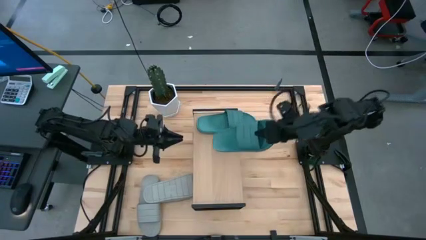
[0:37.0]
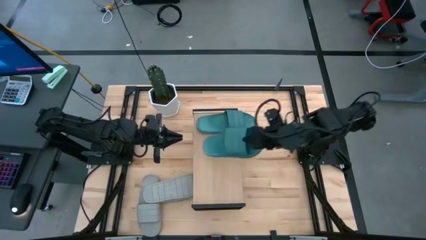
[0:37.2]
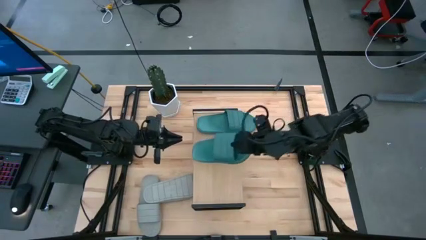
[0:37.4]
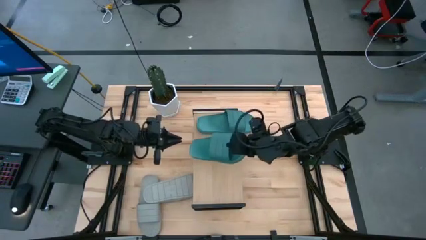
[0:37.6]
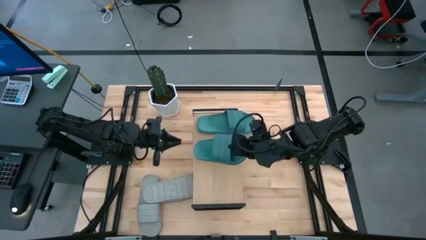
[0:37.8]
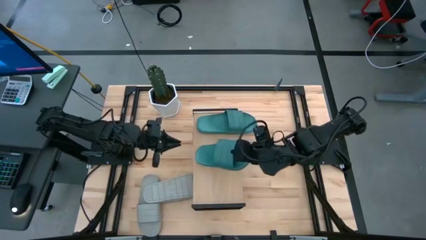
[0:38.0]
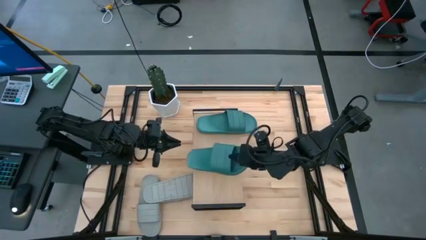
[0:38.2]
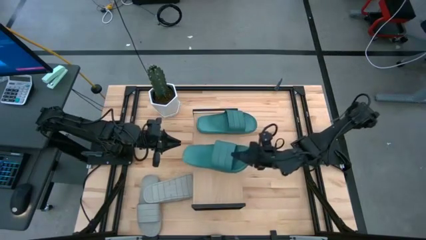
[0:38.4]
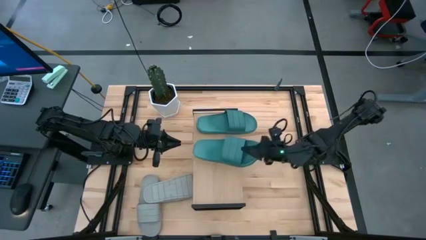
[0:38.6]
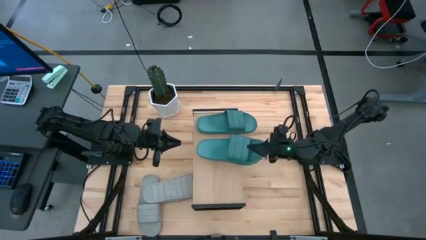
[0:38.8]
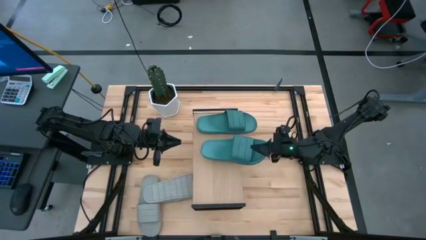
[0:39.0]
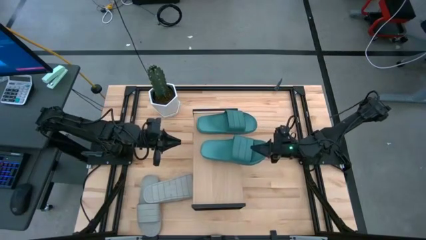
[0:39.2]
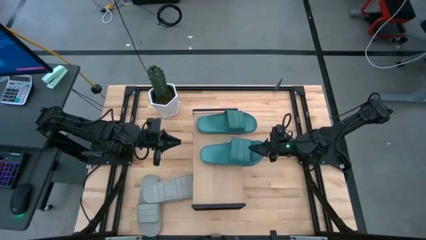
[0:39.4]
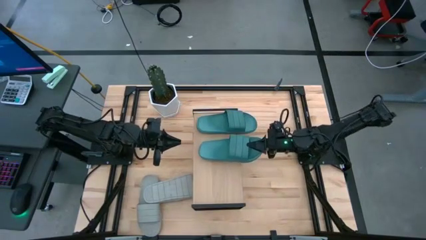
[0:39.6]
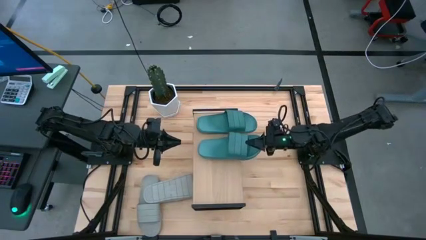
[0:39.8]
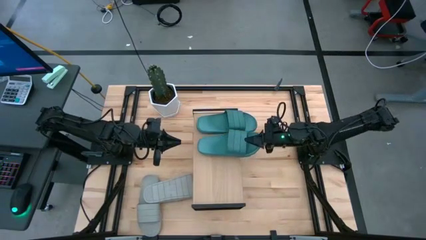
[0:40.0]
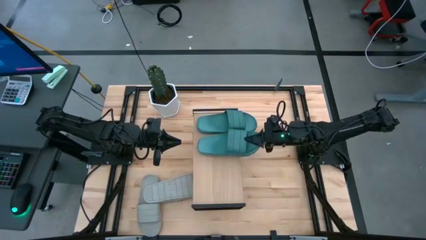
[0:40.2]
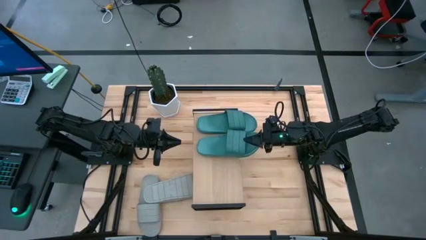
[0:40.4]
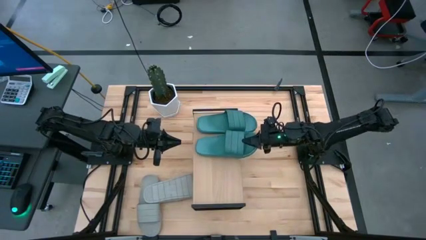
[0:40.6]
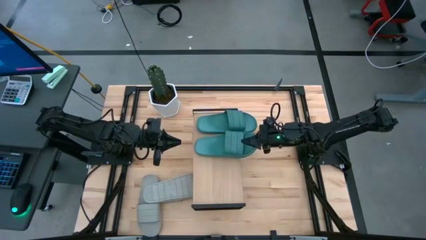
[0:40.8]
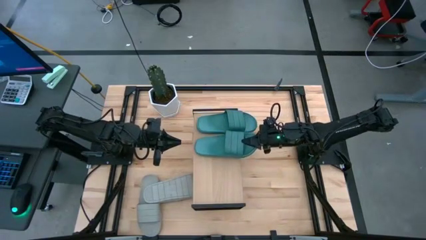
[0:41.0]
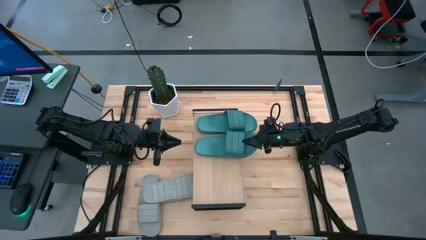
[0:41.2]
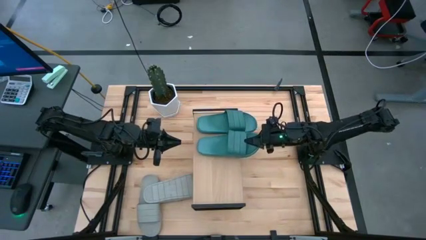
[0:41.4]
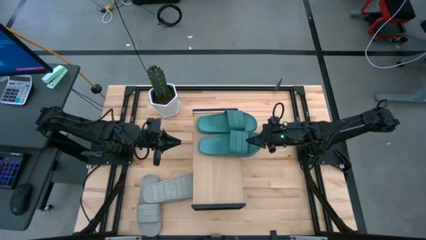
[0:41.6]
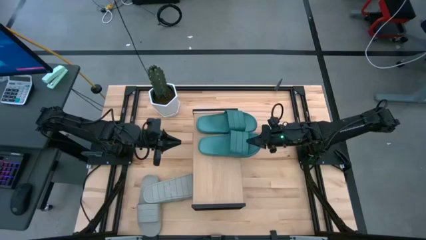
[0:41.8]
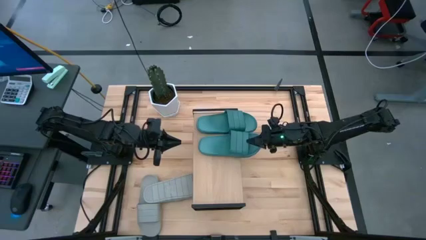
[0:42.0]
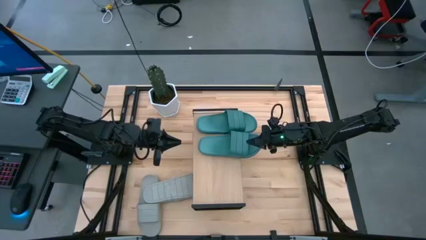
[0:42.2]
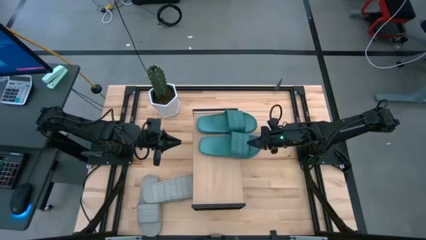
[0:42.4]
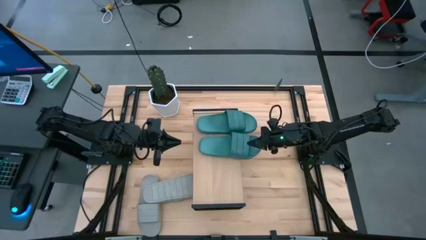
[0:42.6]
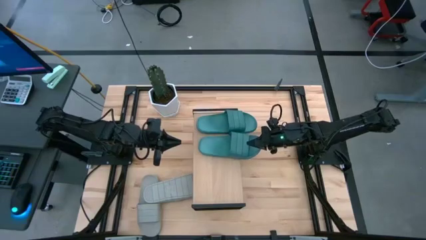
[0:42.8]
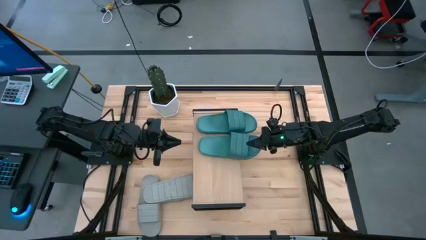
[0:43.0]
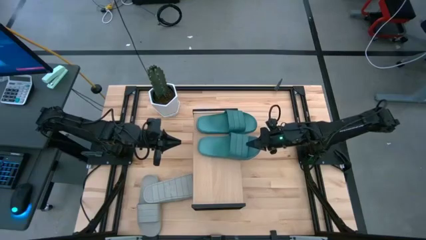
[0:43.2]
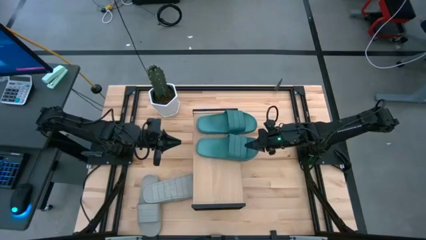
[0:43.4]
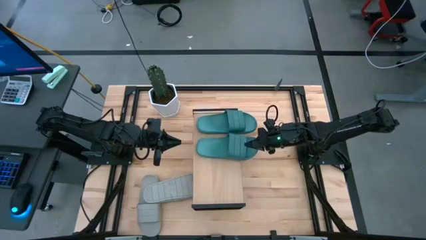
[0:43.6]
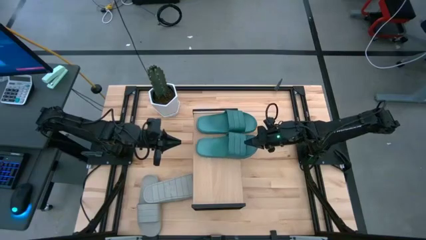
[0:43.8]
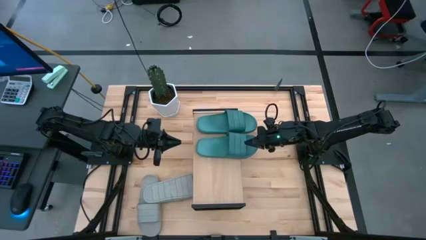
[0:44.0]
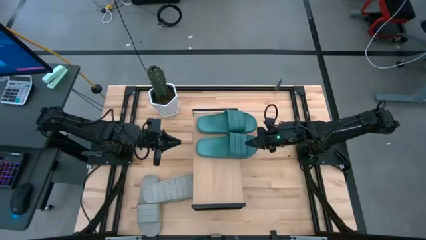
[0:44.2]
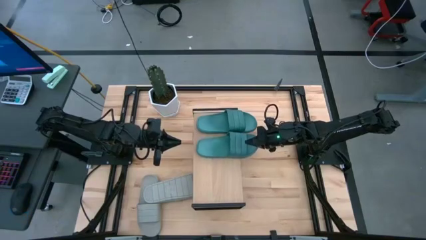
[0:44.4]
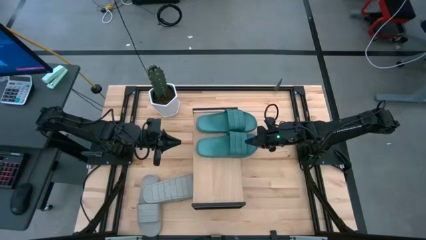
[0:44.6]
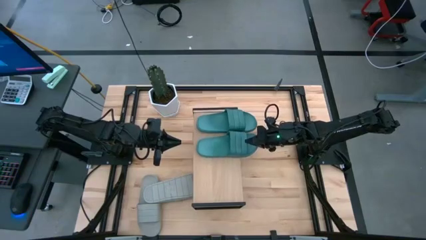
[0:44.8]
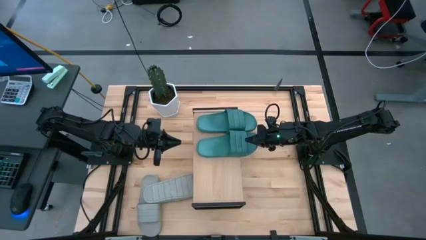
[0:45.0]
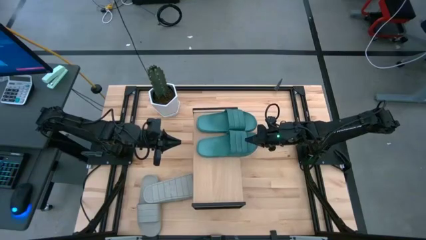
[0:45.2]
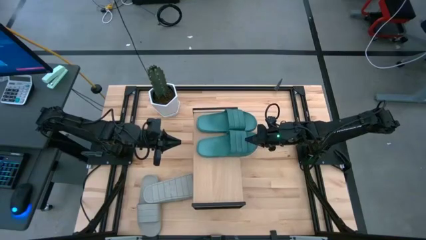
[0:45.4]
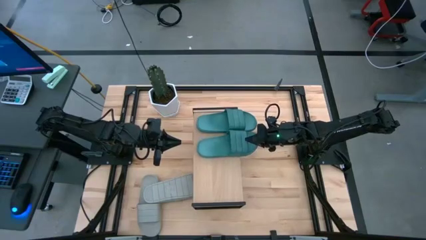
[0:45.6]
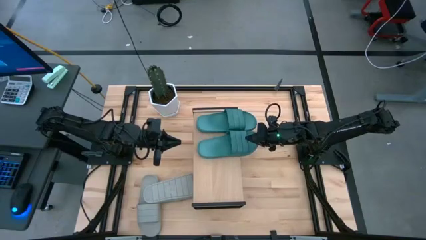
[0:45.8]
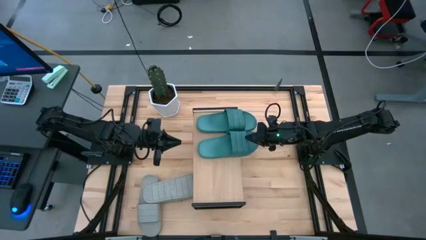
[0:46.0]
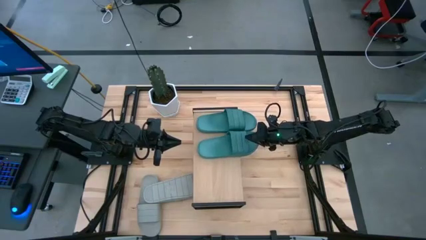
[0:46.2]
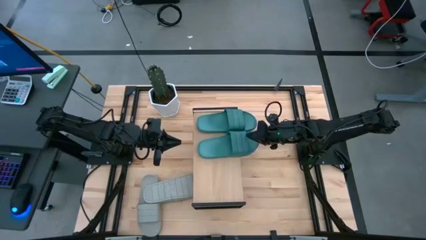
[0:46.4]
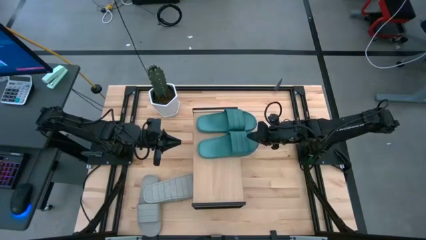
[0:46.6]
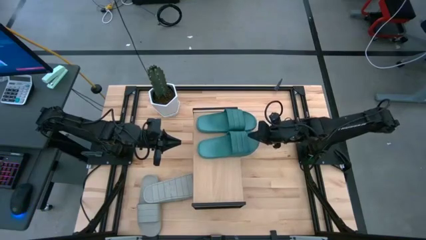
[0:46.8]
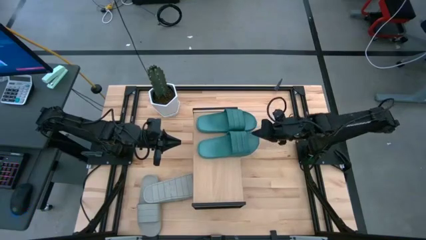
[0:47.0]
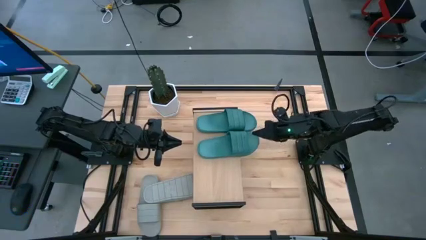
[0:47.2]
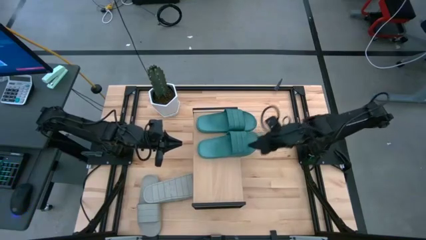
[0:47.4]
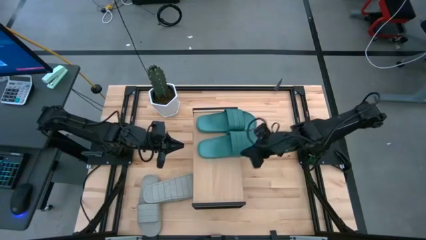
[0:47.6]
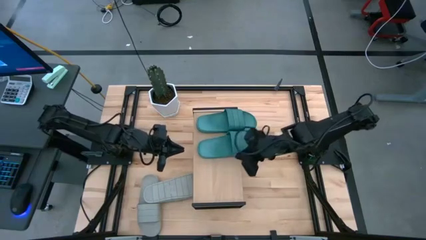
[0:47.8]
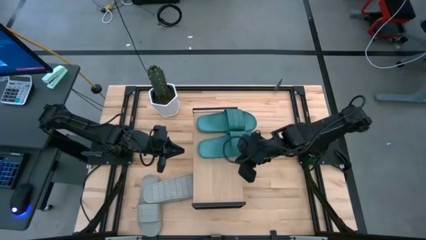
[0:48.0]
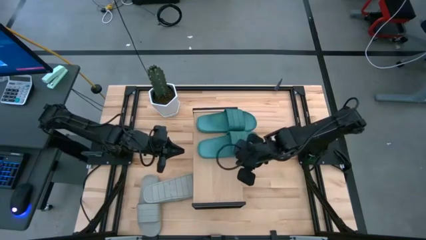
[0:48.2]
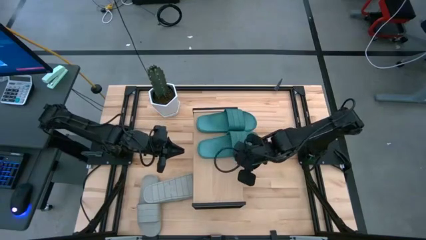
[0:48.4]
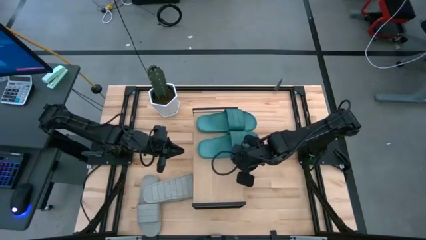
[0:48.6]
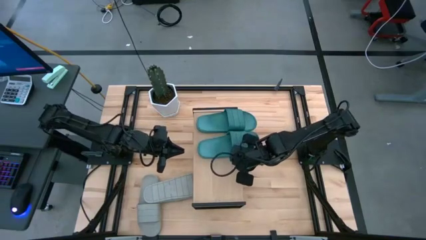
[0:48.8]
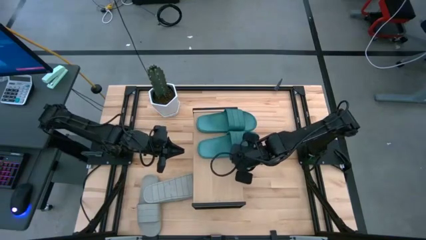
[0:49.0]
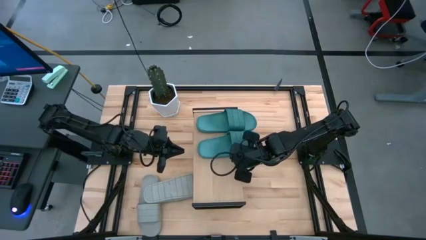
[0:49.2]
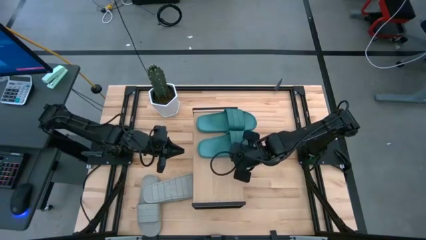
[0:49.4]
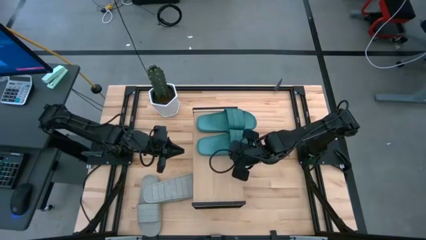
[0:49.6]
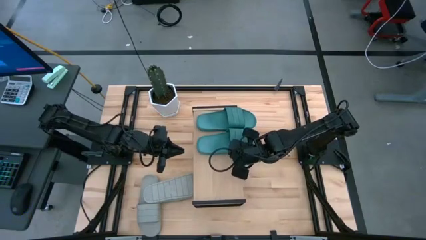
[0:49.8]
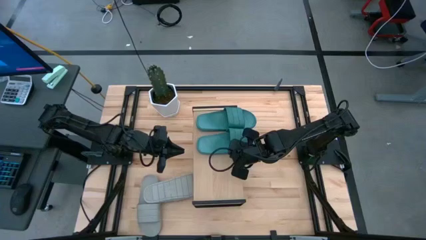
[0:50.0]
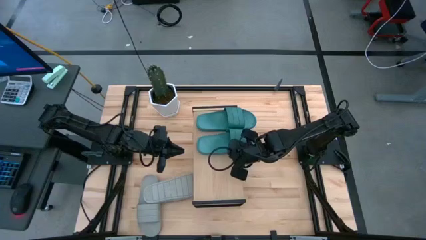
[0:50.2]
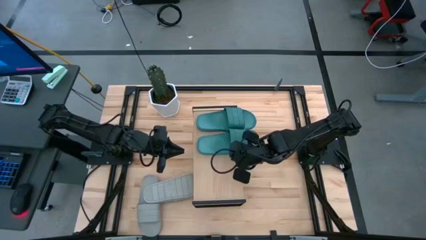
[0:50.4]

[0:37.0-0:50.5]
Task: Pick and place slides into the shelf
Put the green slide on the shelf
